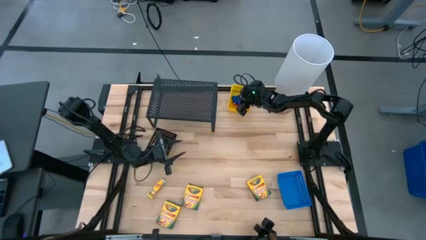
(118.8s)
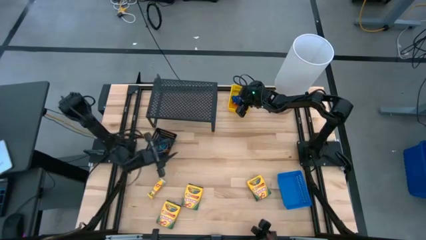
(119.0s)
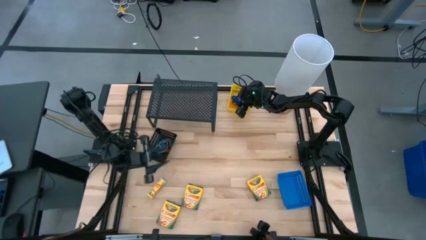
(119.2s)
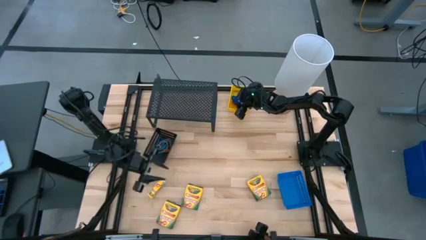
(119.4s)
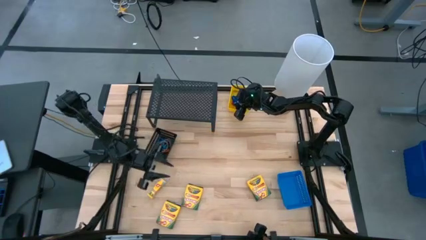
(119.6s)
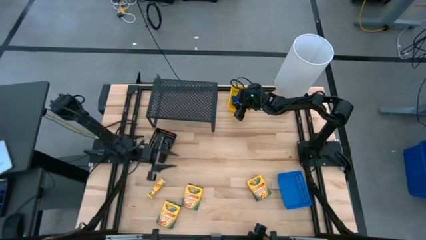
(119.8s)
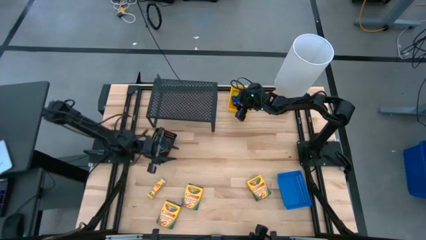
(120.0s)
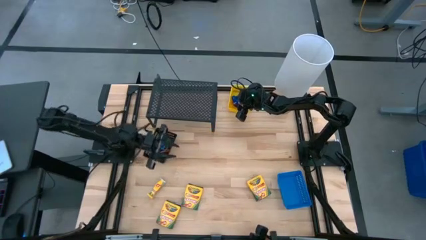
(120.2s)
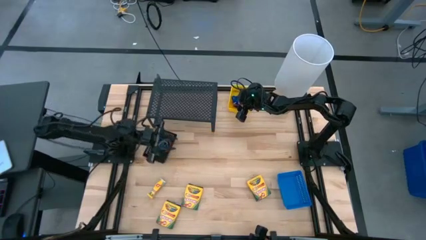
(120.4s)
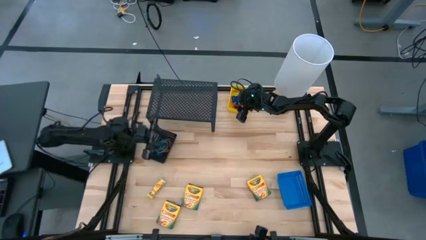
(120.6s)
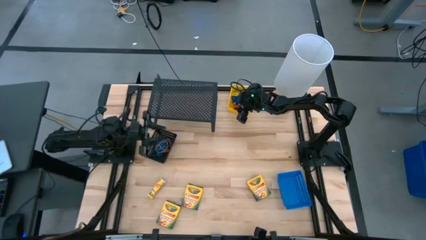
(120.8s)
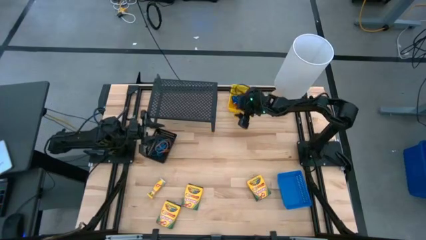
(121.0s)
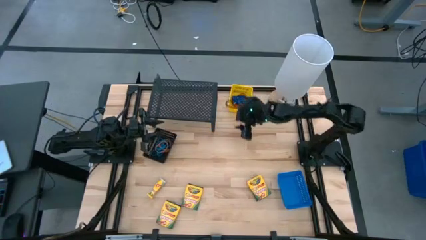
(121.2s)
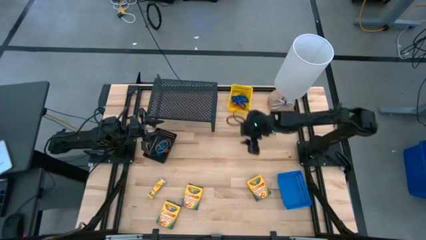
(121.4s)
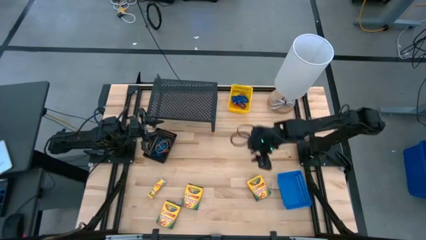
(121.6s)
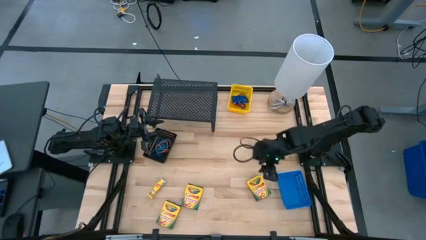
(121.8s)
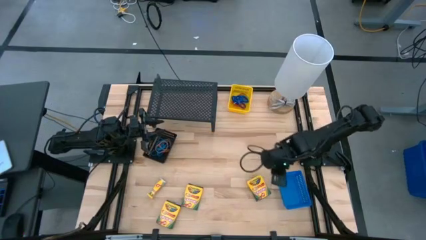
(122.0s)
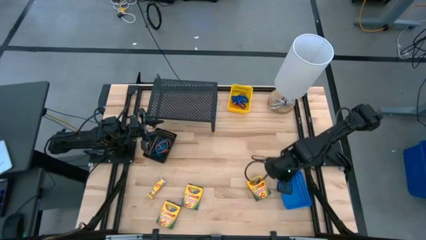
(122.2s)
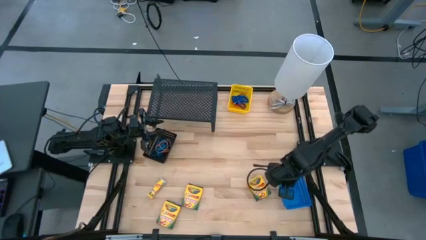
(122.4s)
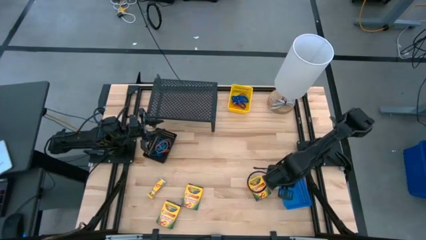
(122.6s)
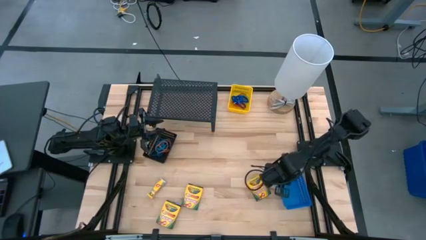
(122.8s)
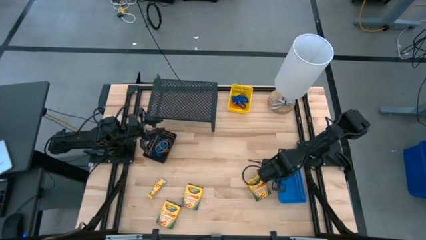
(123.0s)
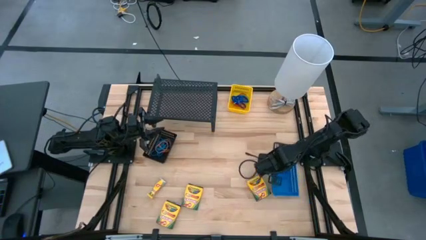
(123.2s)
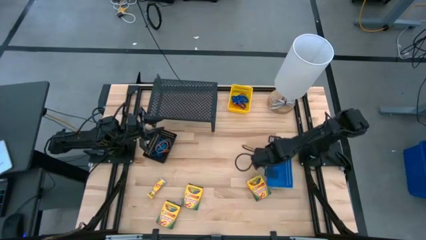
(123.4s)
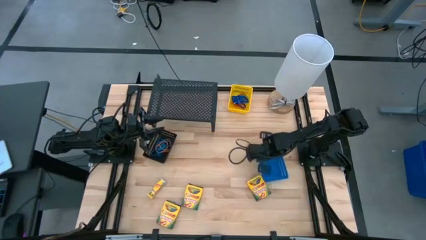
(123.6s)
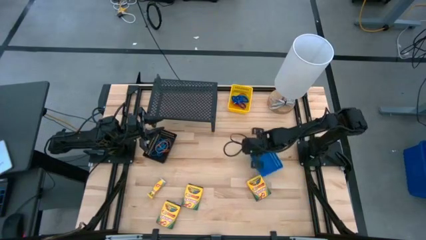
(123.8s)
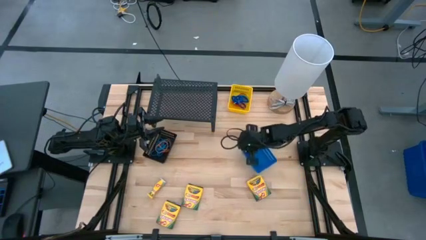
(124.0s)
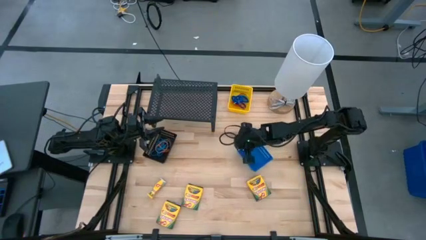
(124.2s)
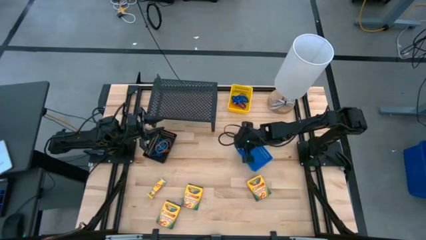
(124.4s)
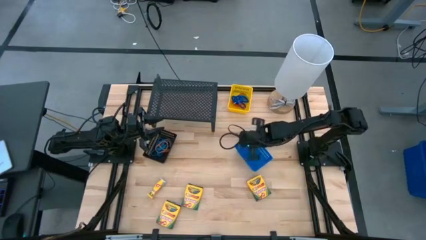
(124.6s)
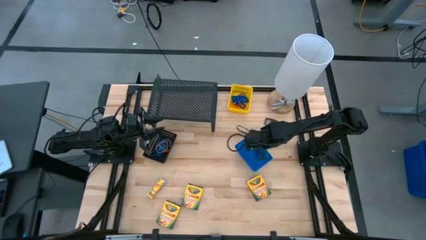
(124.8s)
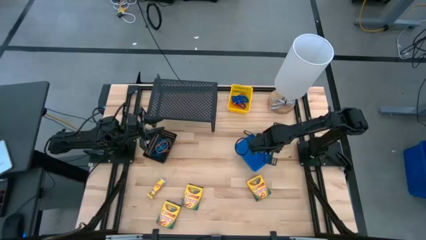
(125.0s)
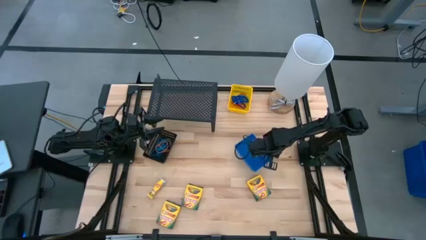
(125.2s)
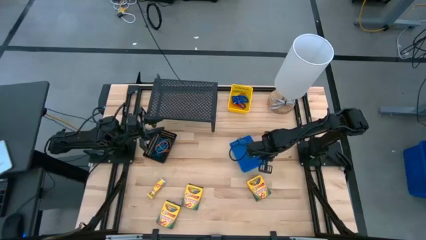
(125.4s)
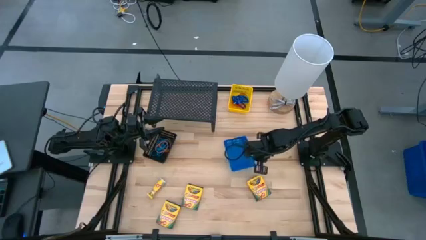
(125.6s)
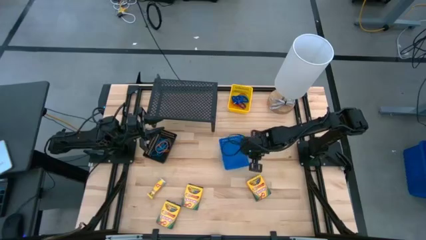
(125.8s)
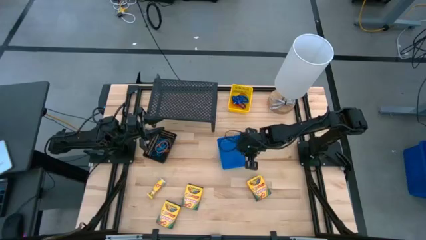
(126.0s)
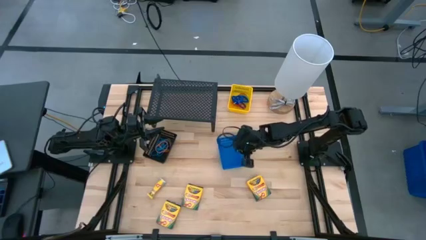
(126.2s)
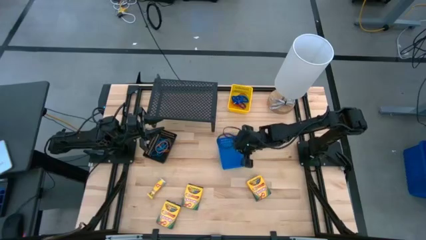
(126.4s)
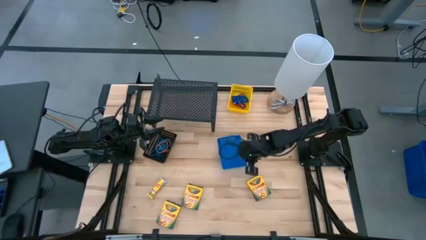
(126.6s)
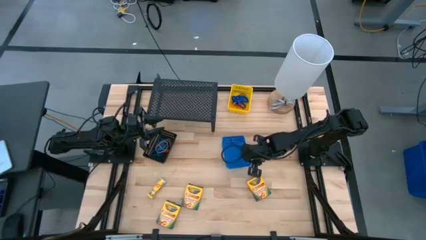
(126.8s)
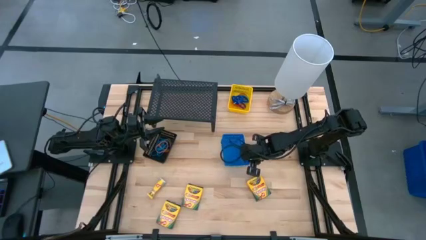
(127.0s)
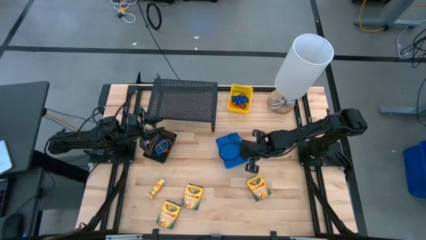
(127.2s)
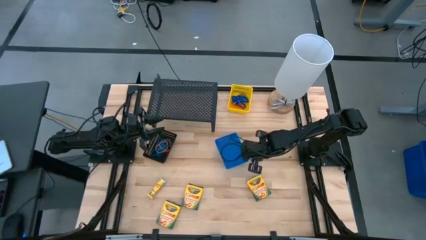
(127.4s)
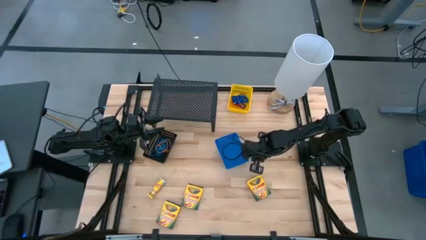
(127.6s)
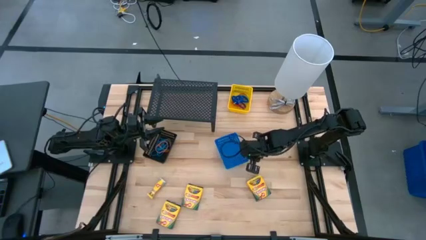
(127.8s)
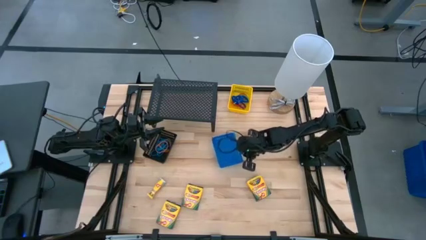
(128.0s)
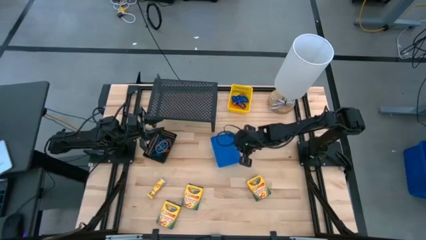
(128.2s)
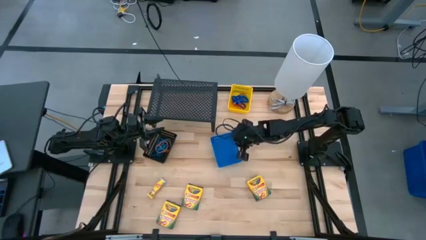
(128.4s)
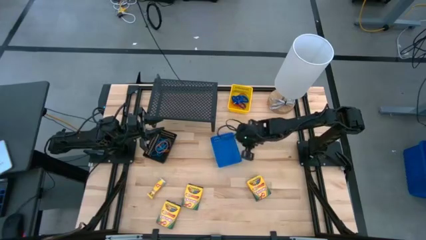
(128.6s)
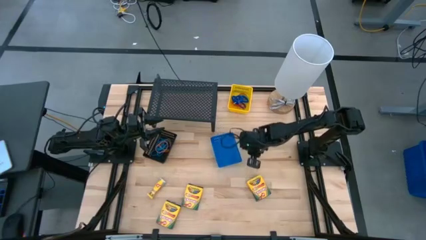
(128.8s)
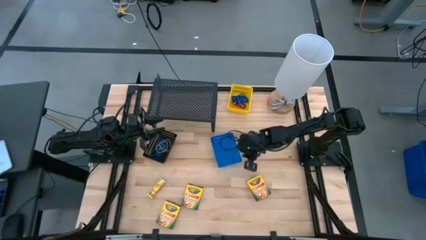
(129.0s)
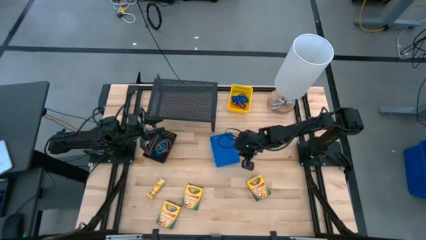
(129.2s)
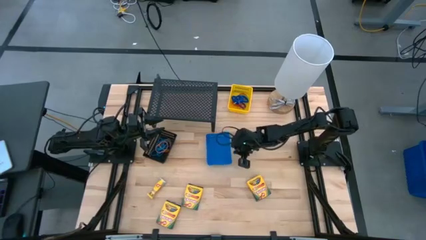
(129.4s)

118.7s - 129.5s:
Task: Pick & Place Office Desk Supplies
Move the blue bin to the center of the table

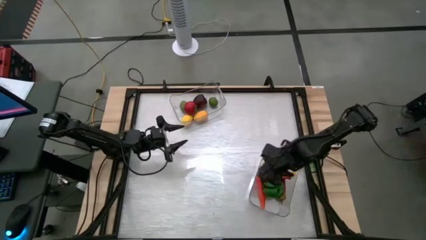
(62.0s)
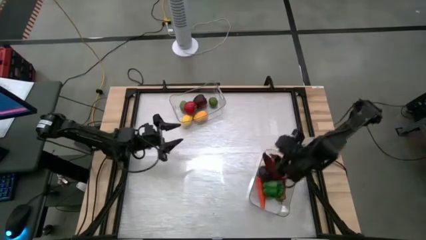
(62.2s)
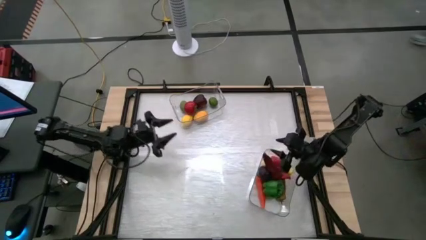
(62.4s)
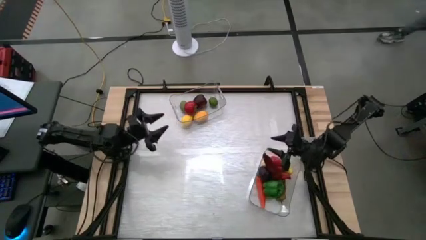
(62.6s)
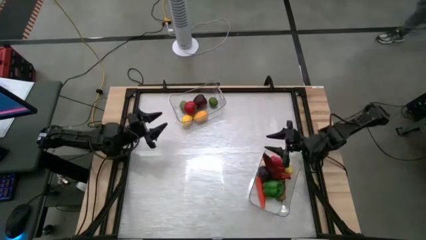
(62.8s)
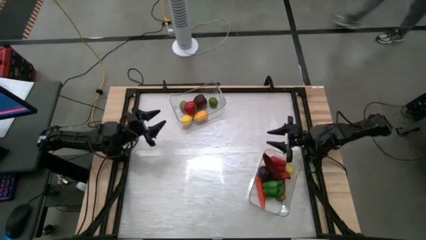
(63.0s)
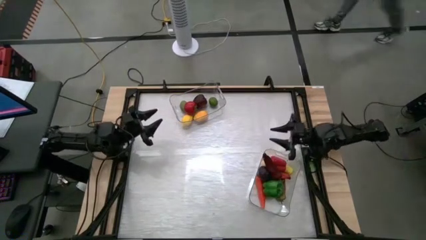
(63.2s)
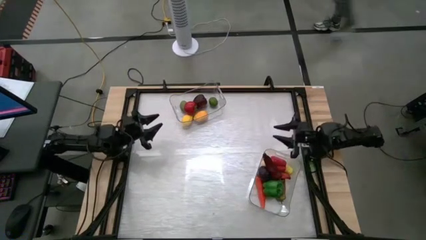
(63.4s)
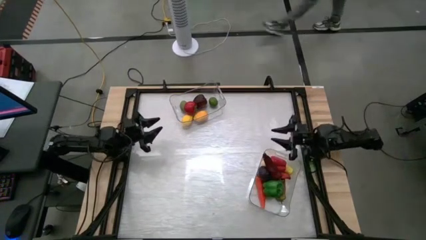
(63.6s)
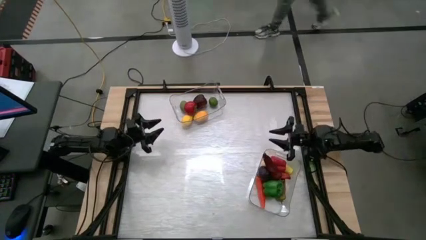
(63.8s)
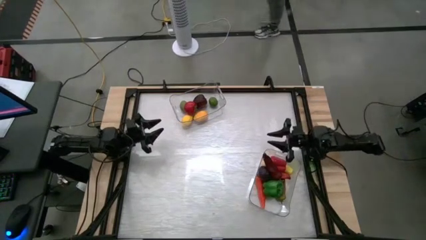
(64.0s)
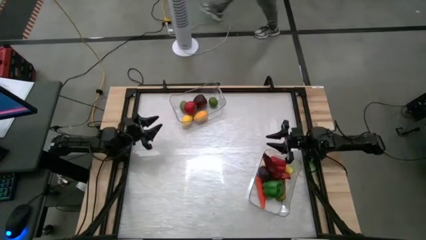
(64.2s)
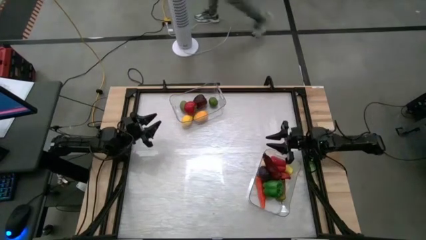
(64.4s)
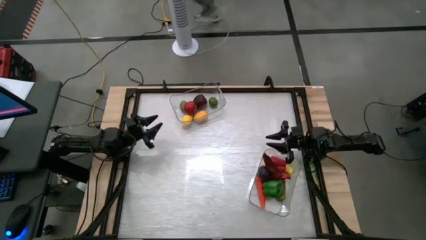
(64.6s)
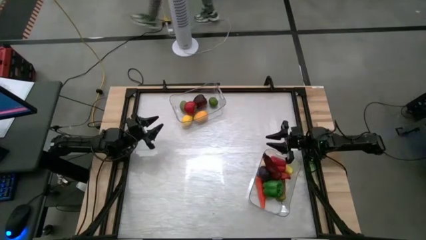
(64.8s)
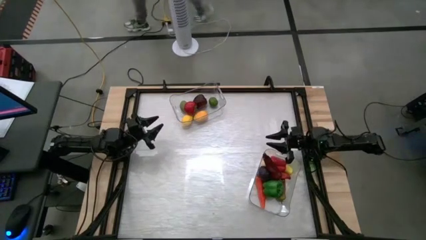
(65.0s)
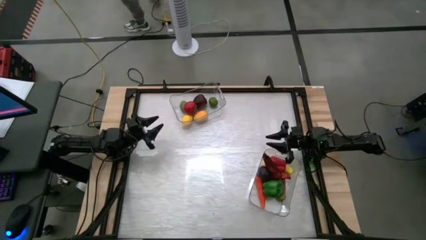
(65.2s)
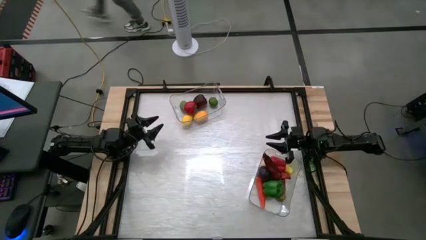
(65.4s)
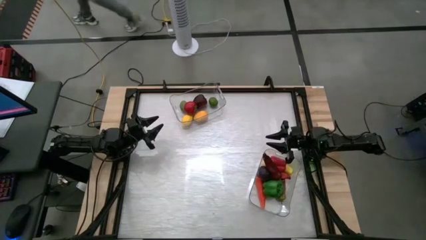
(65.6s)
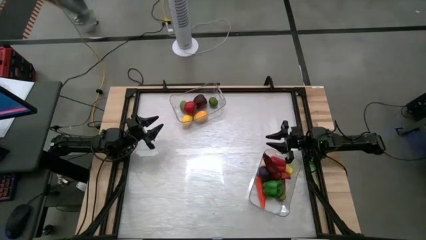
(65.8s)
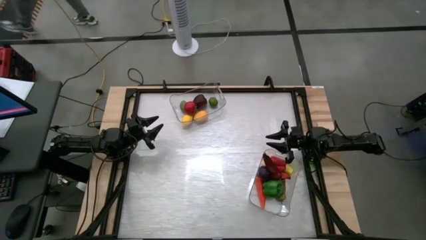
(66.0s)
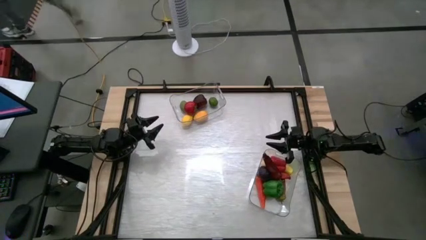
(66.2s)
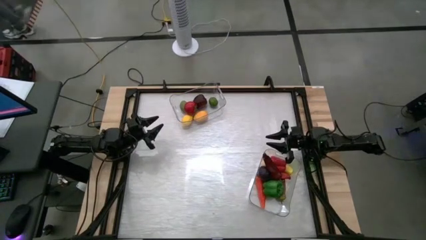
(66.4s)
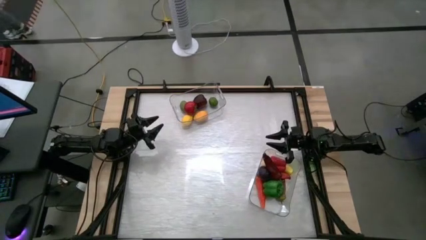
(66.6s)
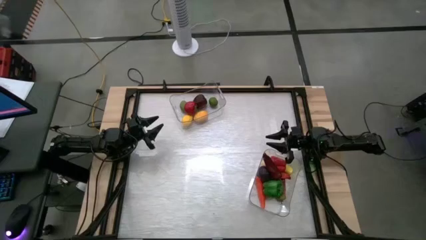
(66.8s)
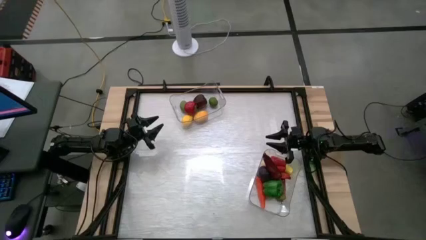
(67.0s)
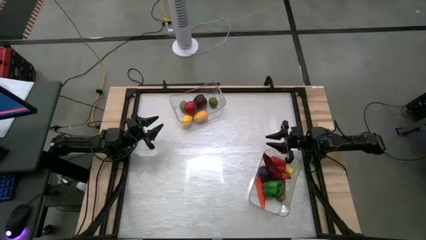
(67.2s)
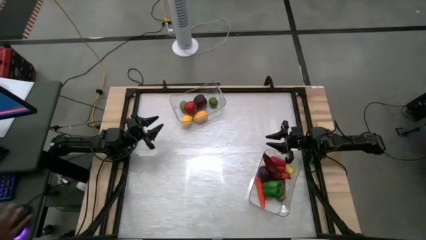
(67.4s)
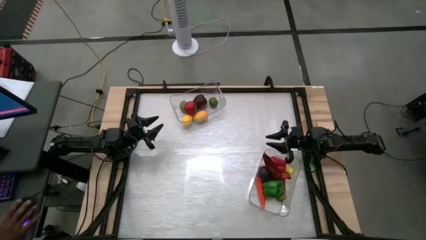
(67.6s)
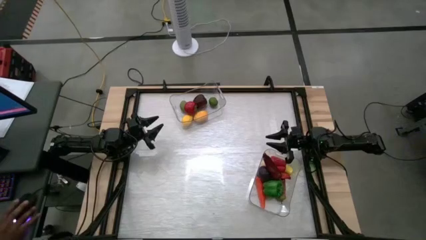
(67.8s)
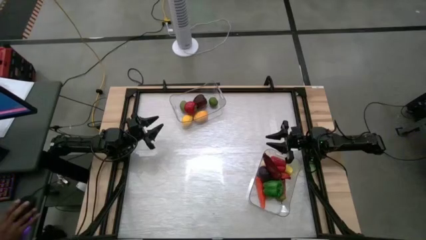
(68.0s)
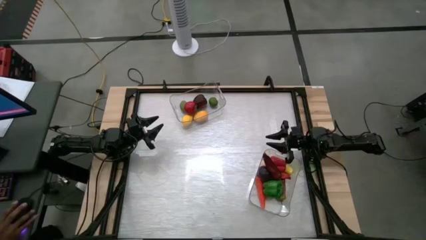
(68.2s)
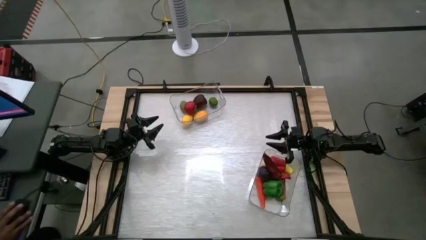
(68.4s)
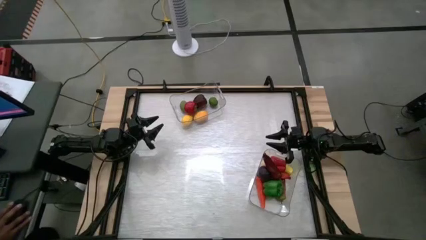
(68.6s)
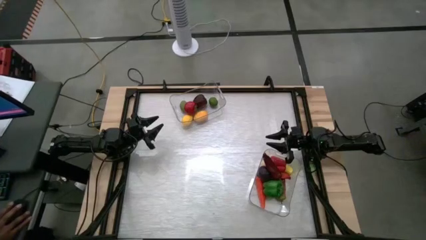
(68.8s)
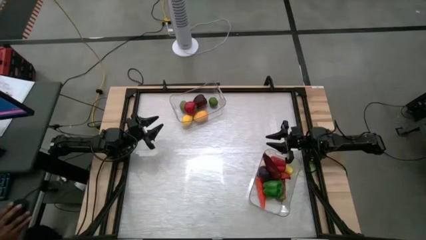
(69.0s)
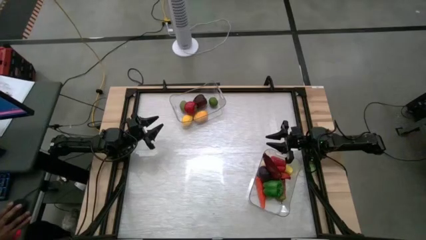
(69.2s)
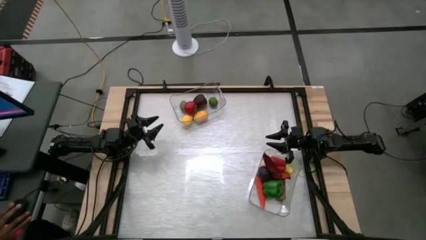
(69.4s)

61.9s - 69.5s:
Task: Sort produce into baskets
Return to Home Position
